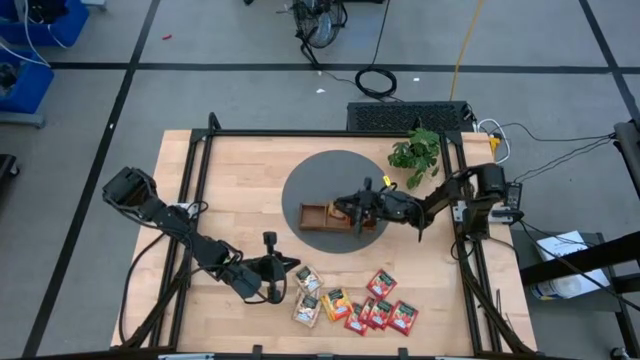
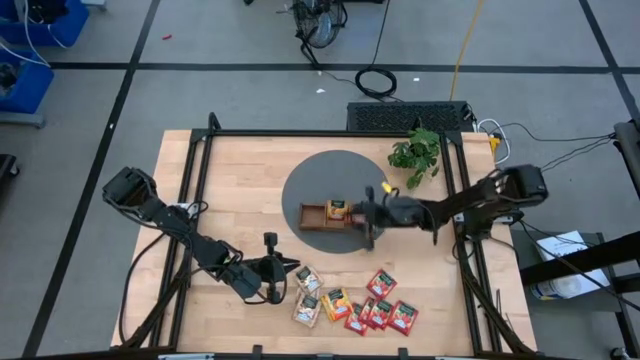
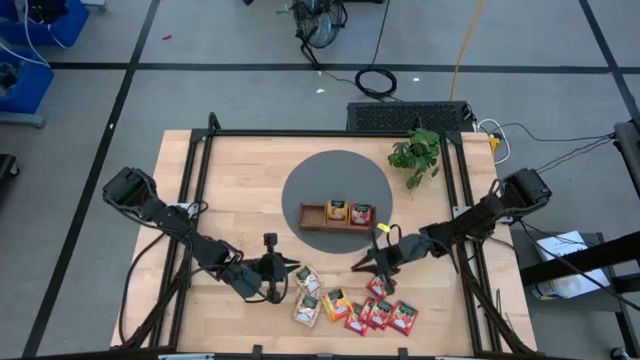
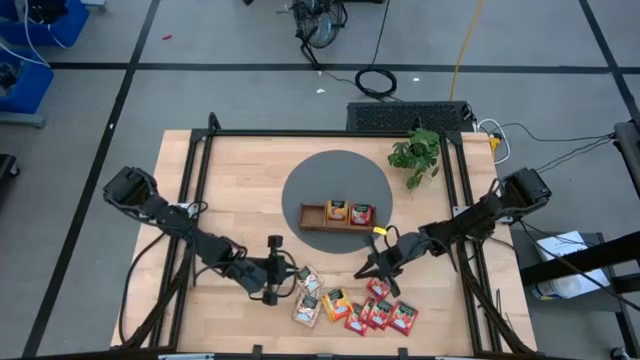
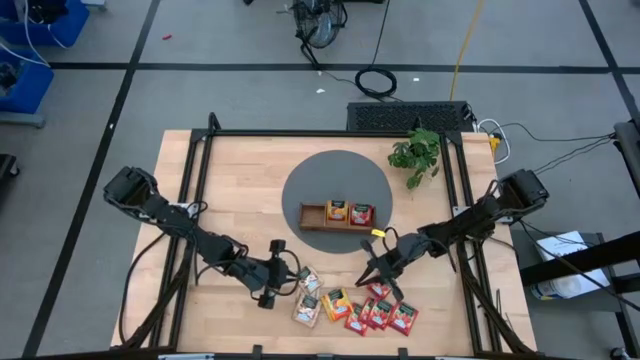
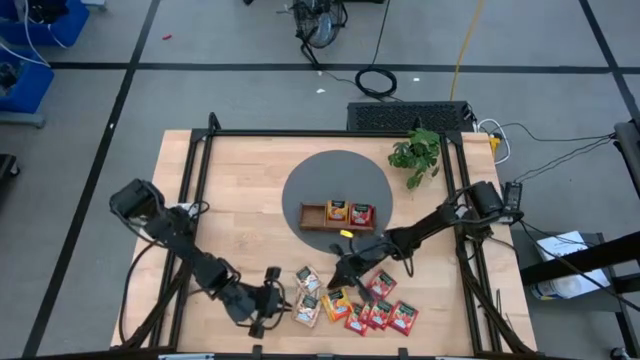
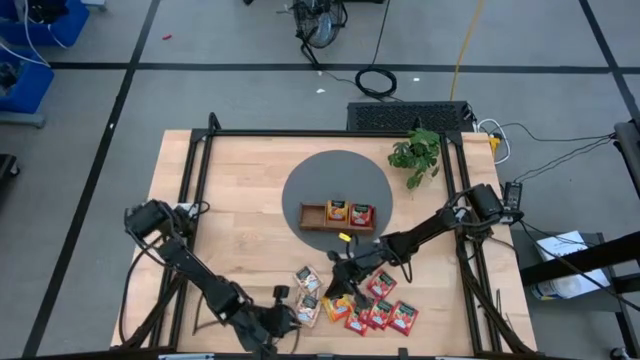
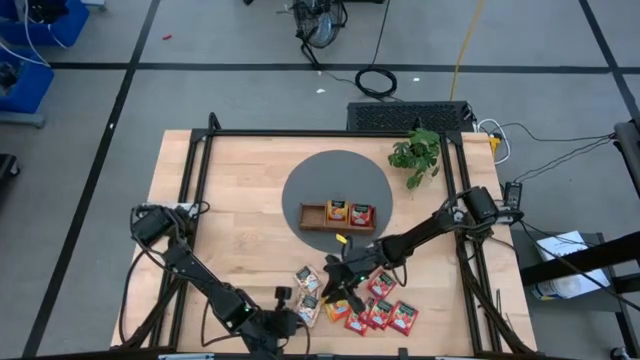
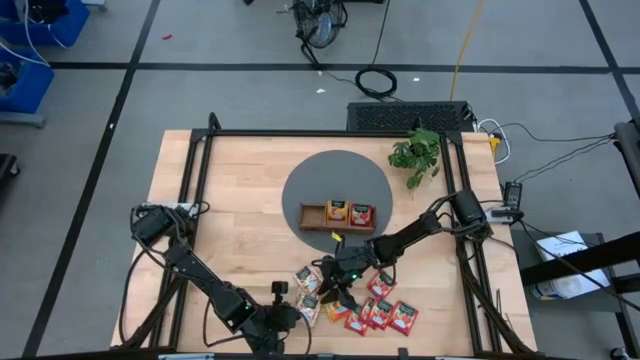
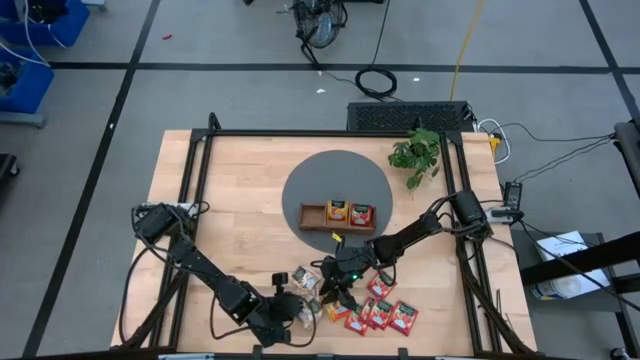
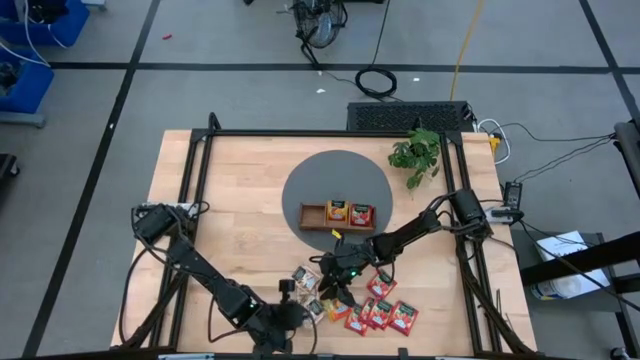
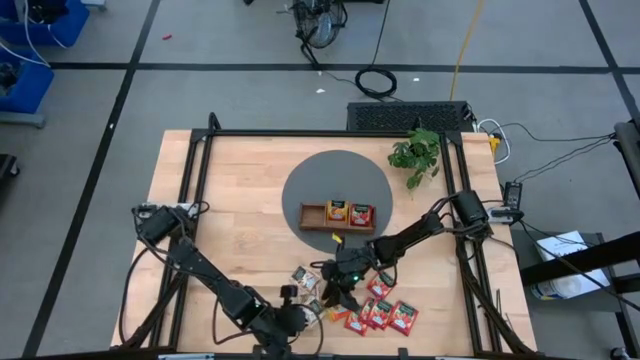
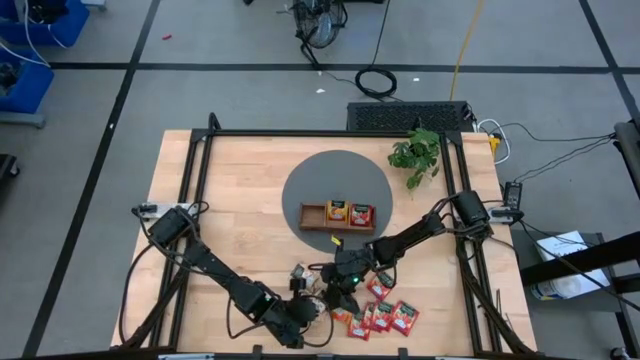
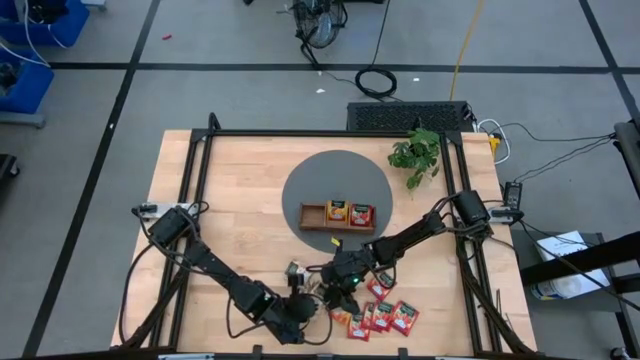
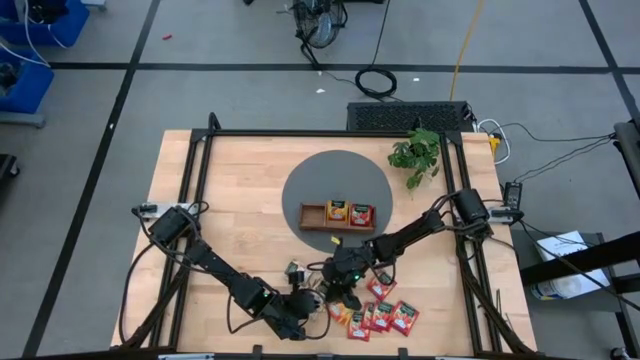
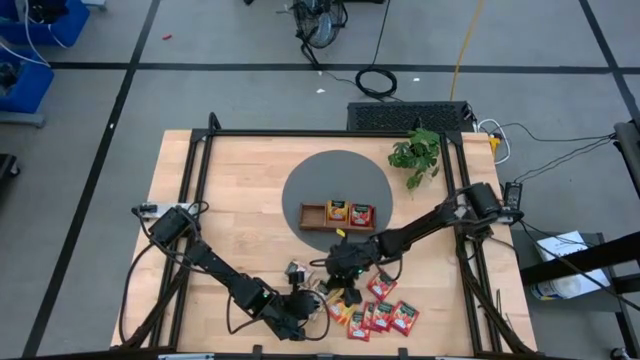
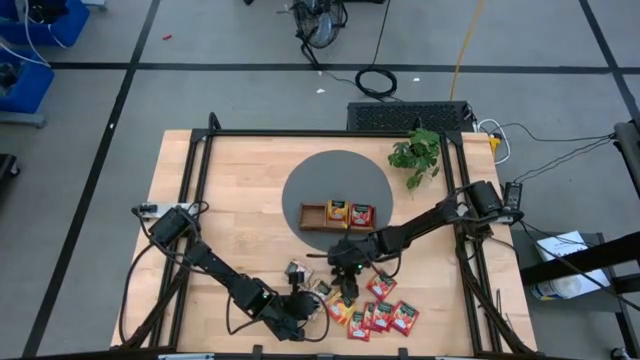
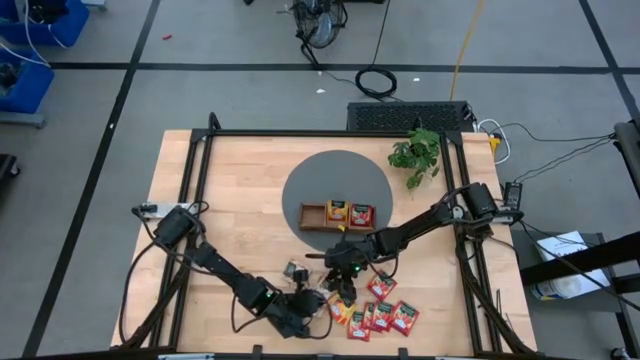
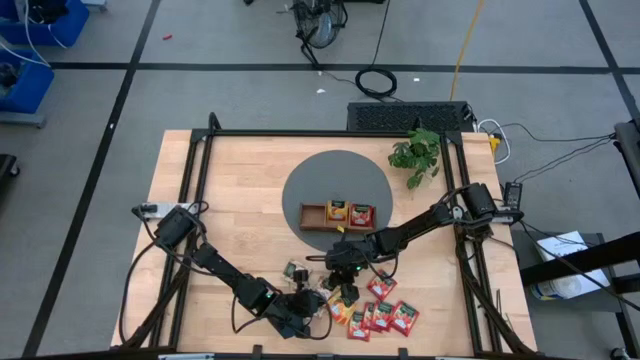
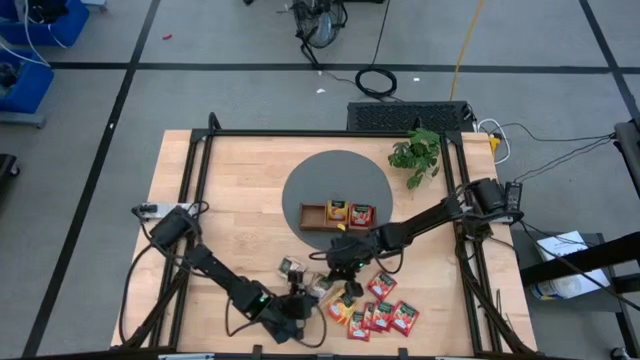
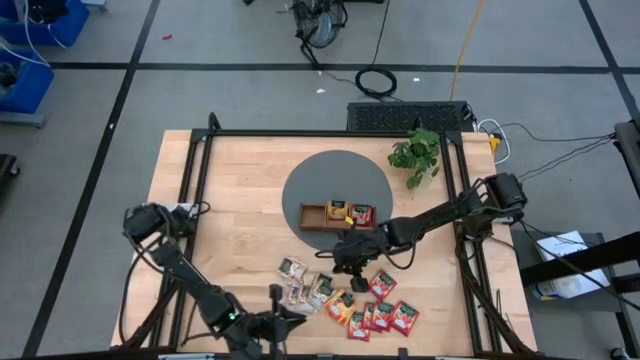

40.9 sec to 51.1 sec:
Task: Pick & Place Tea
Put the brown tea bag into the left slot of the wooden organizer

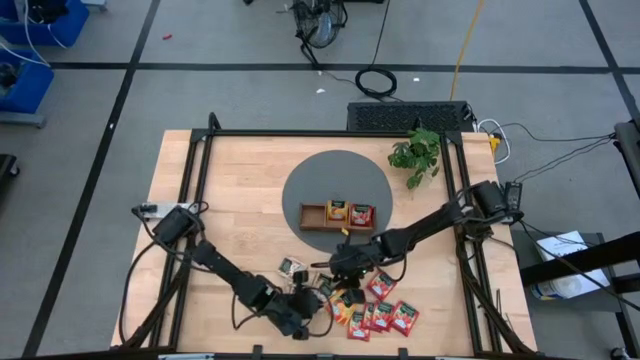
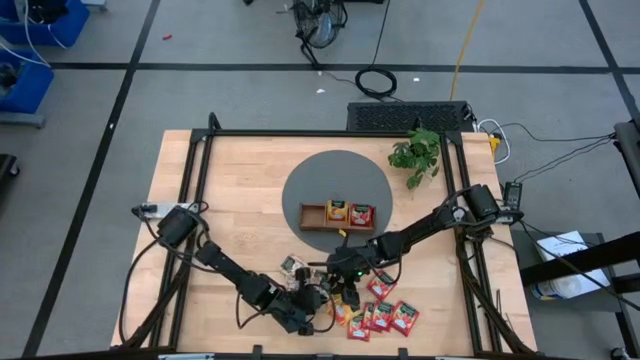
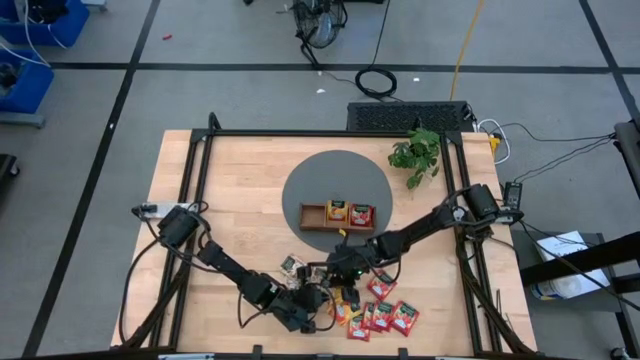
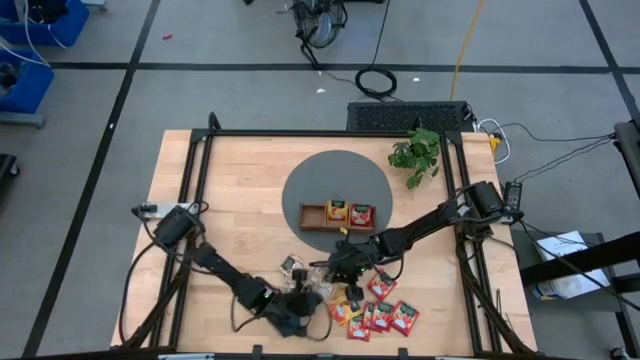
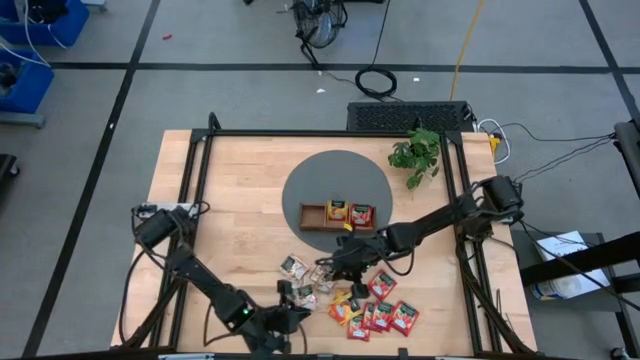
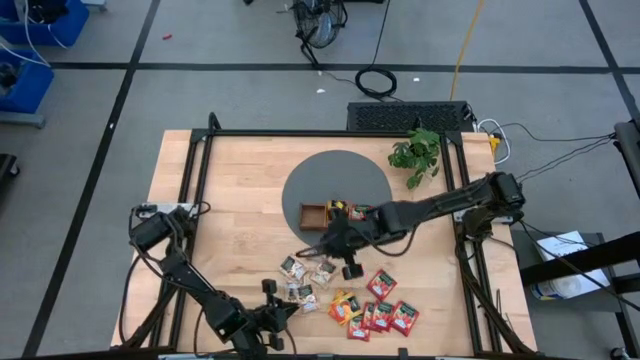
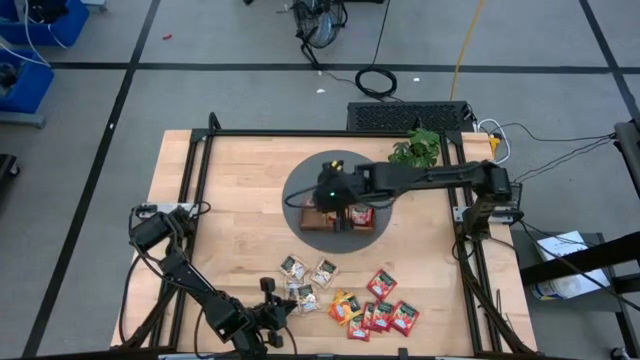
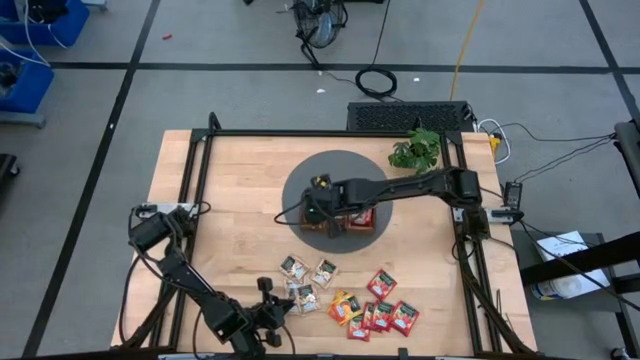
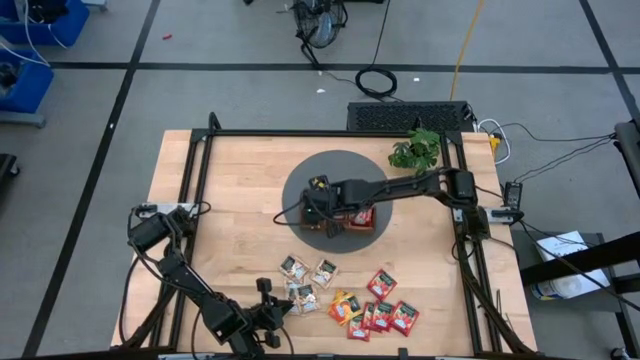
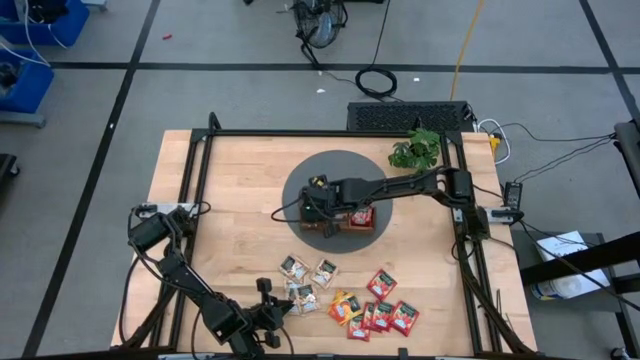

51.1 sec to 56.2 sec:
Put the brown tea bag into the left slot of the wooden organizer

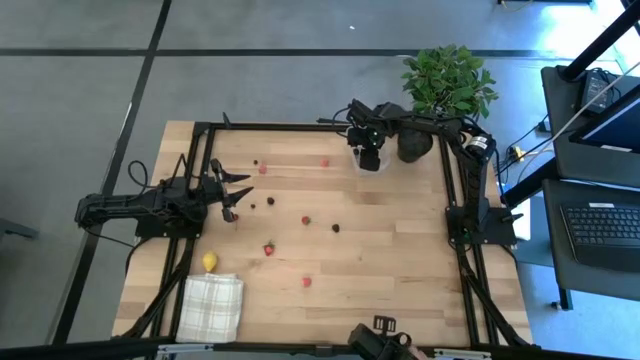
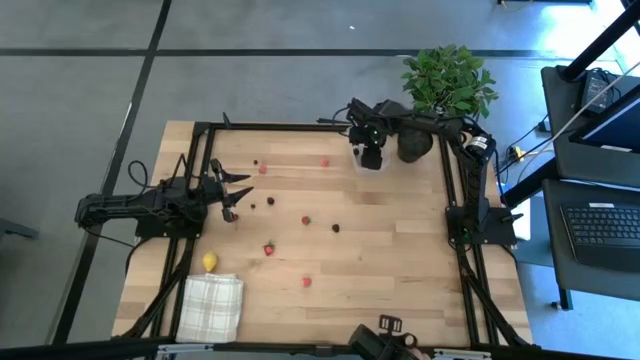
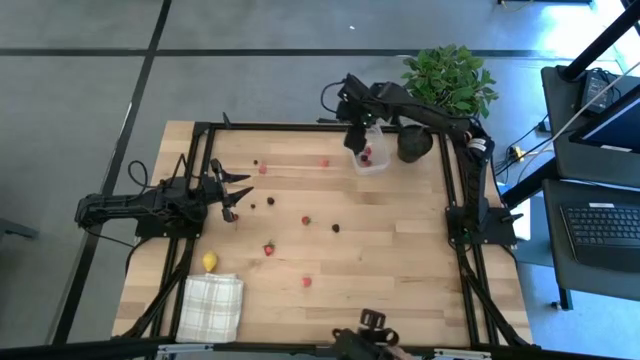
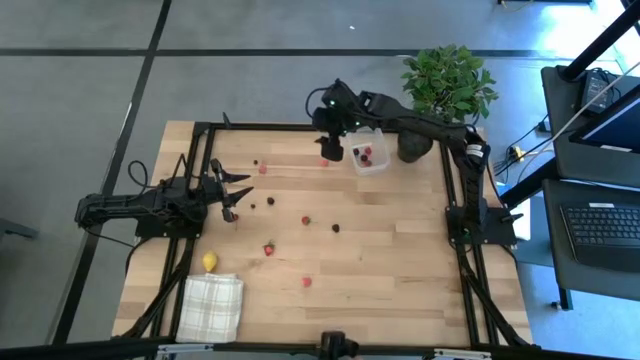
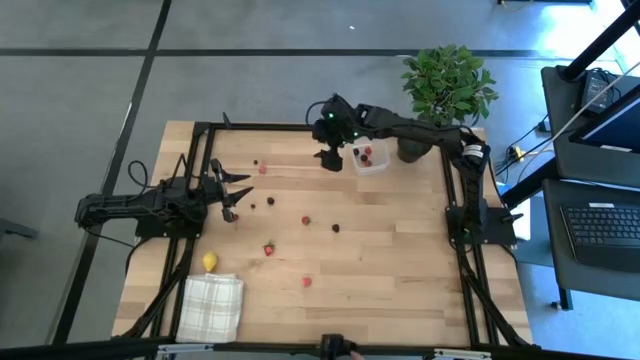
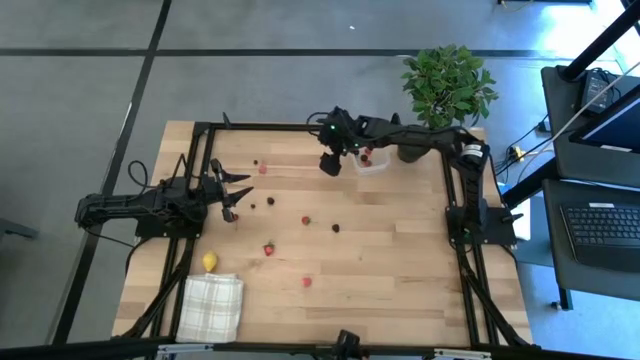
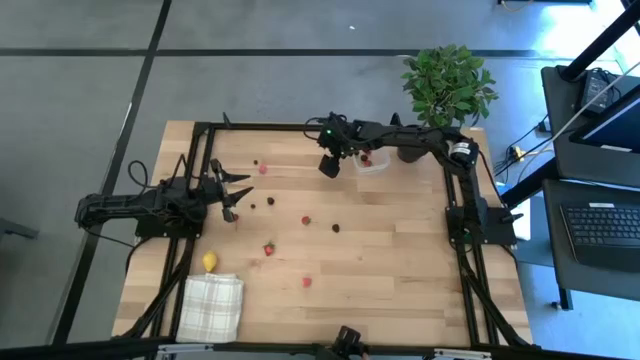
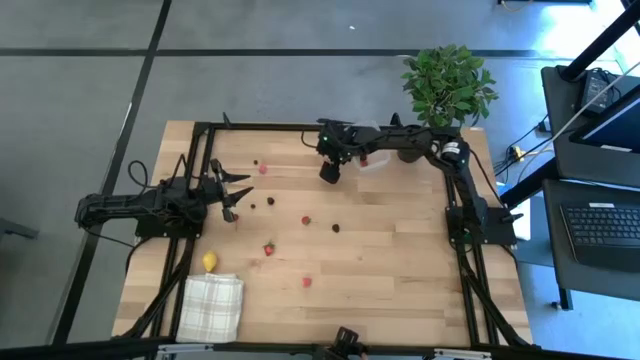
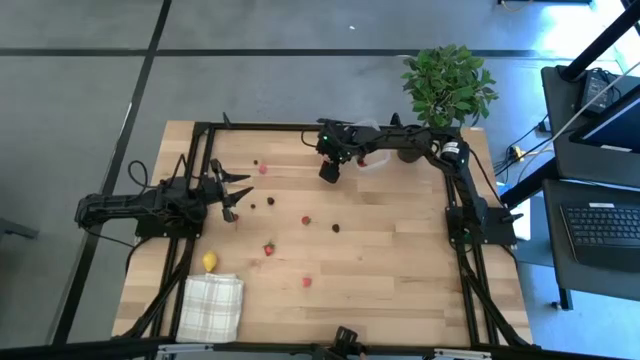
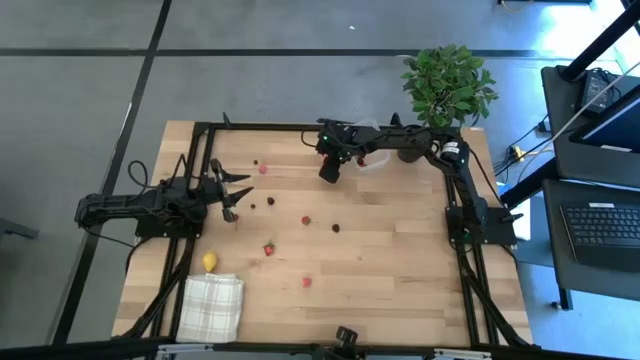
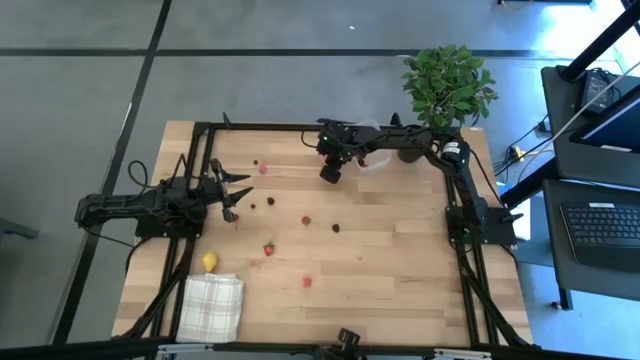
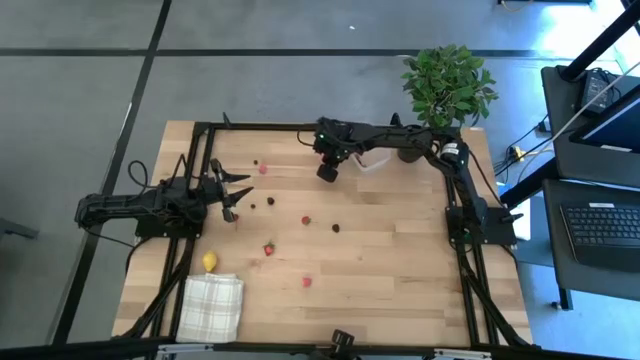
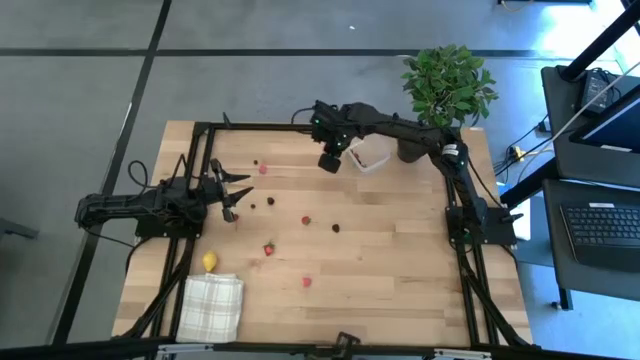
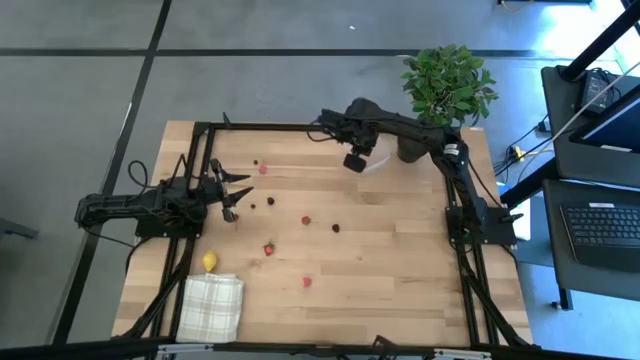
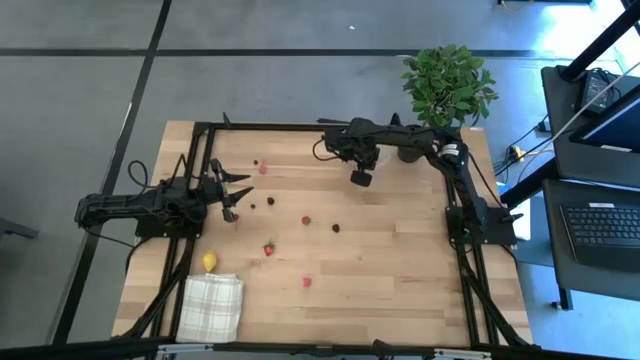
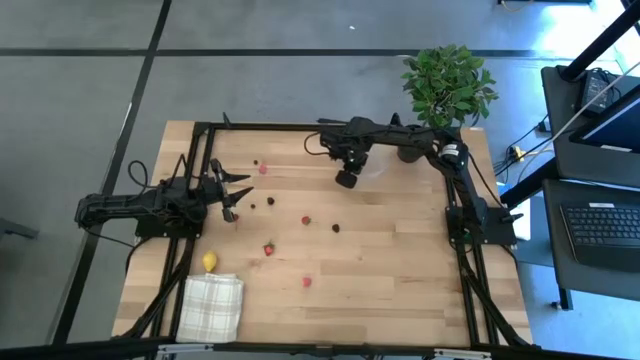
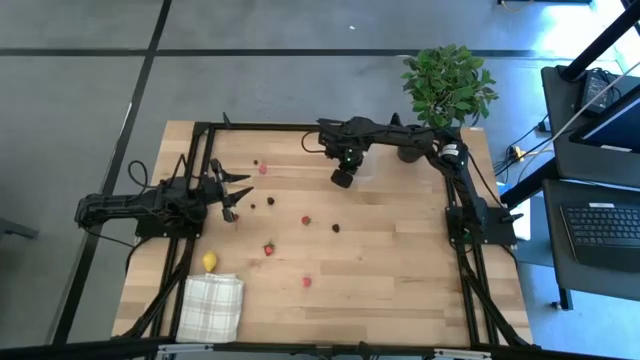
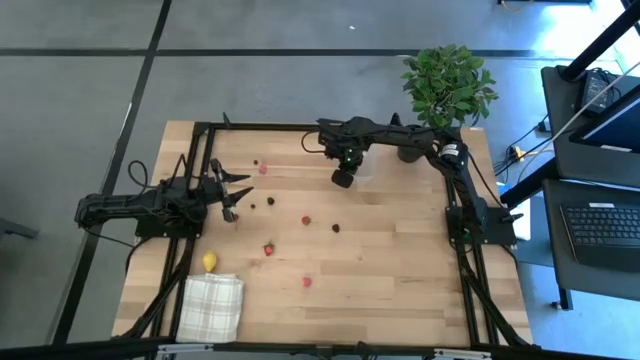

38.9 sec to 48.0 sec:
Task: Pick and placing Produce into tupperware
Put the right peach into the transparent bin
